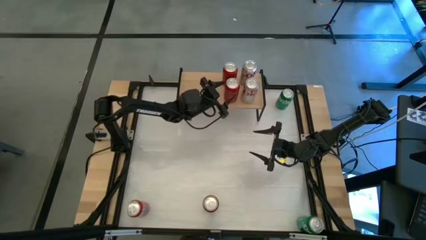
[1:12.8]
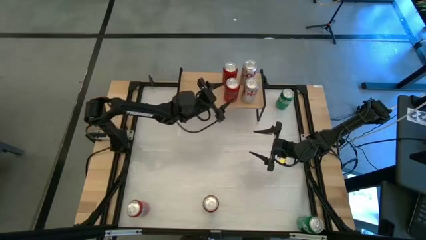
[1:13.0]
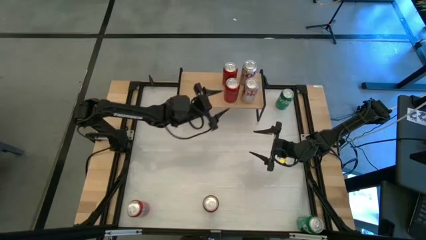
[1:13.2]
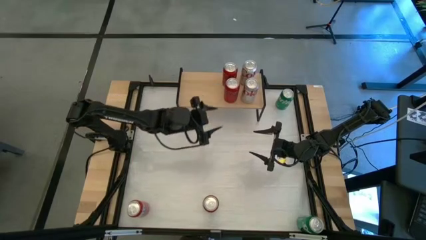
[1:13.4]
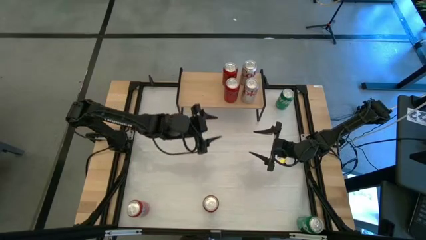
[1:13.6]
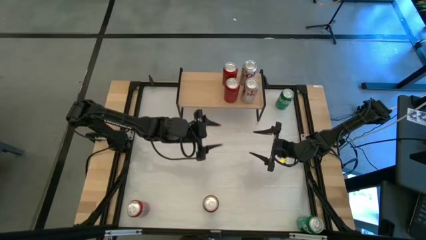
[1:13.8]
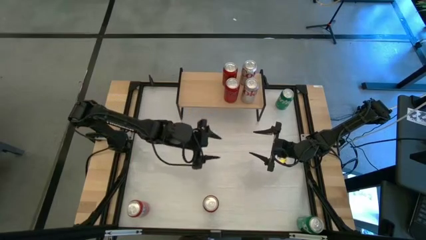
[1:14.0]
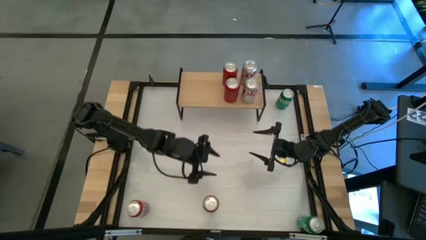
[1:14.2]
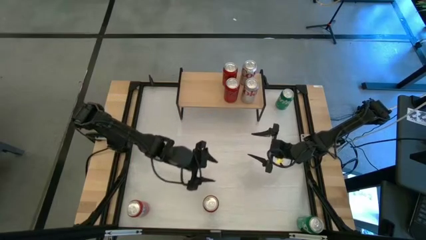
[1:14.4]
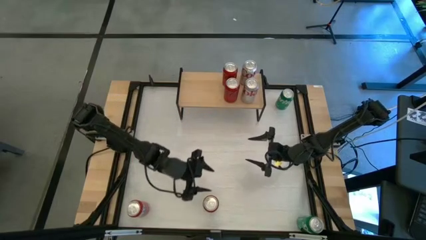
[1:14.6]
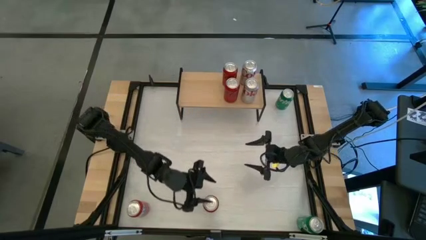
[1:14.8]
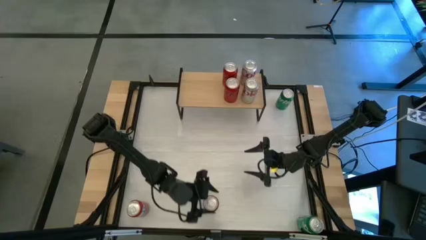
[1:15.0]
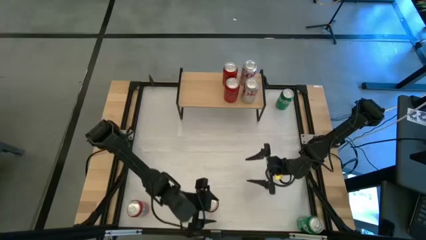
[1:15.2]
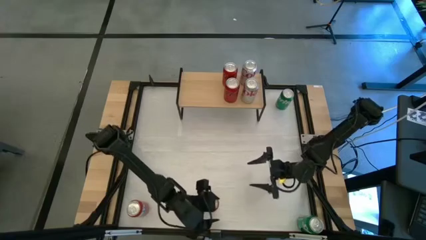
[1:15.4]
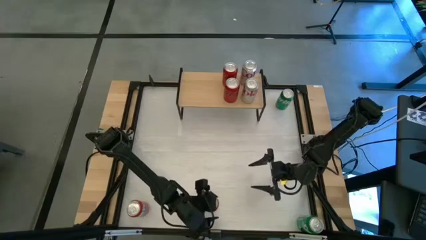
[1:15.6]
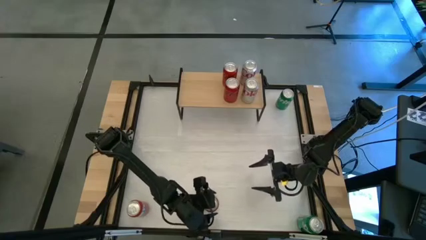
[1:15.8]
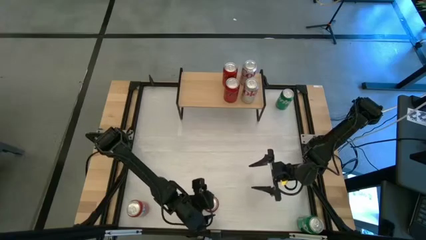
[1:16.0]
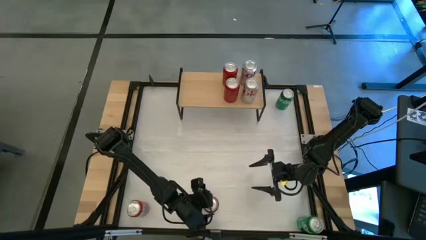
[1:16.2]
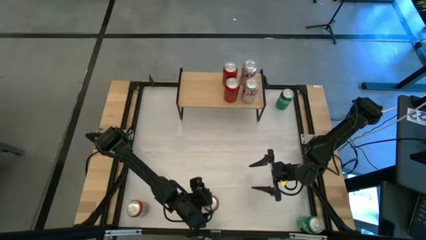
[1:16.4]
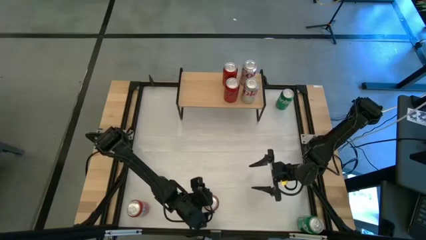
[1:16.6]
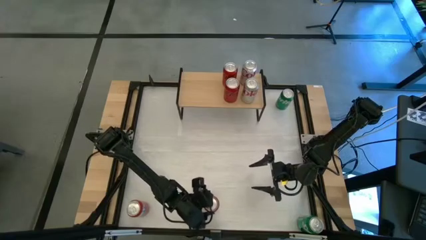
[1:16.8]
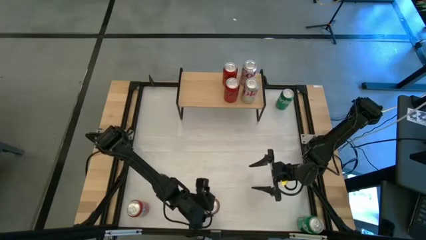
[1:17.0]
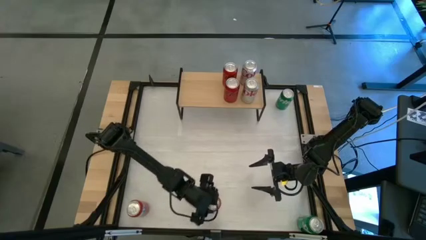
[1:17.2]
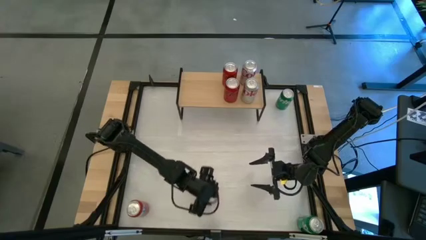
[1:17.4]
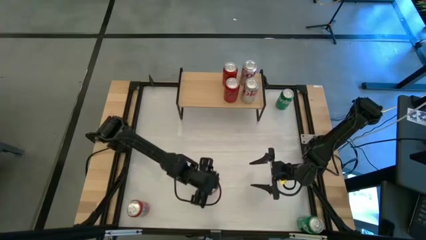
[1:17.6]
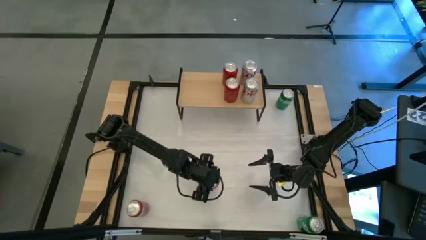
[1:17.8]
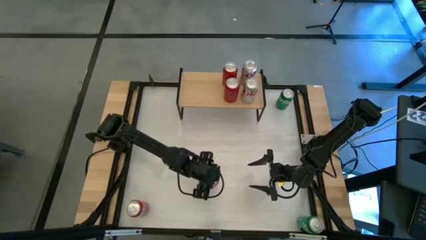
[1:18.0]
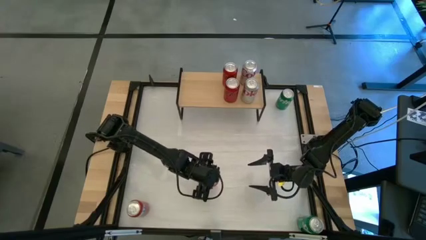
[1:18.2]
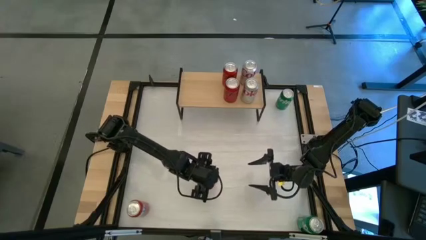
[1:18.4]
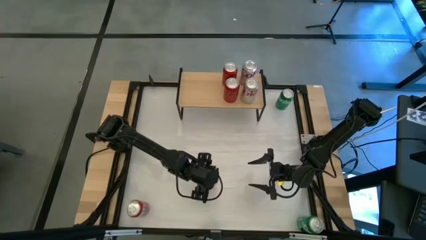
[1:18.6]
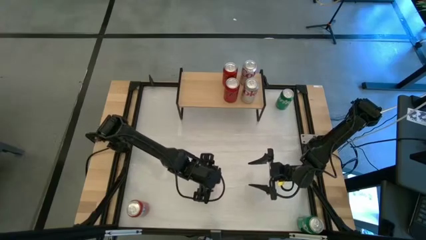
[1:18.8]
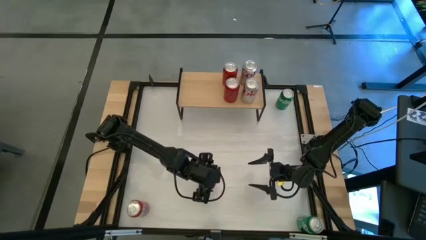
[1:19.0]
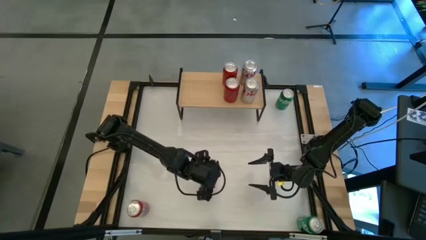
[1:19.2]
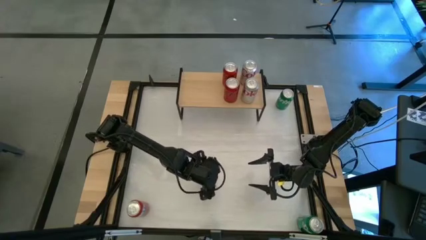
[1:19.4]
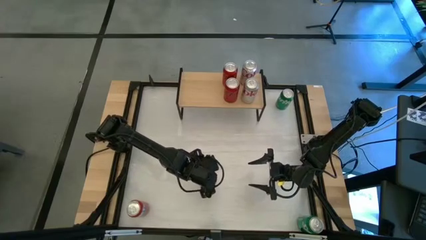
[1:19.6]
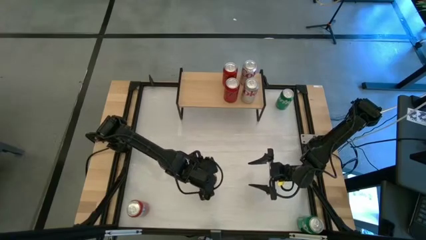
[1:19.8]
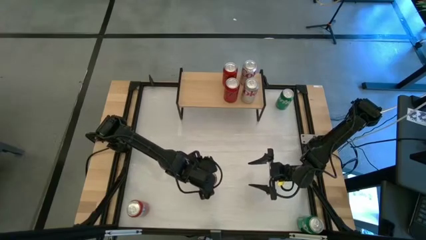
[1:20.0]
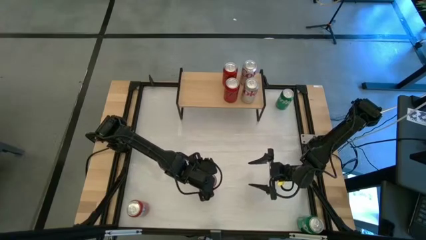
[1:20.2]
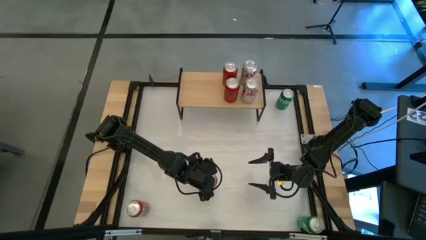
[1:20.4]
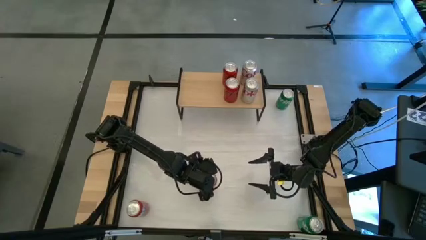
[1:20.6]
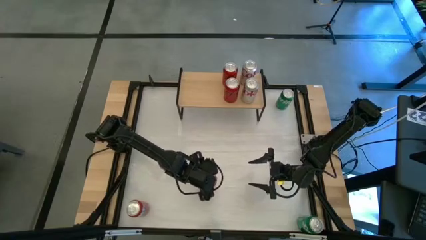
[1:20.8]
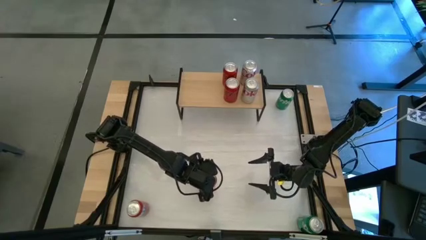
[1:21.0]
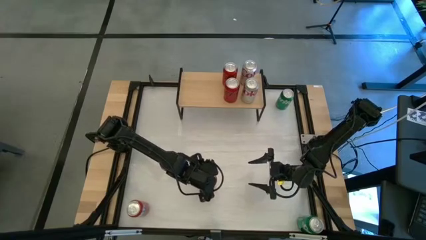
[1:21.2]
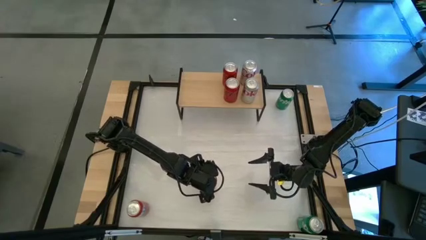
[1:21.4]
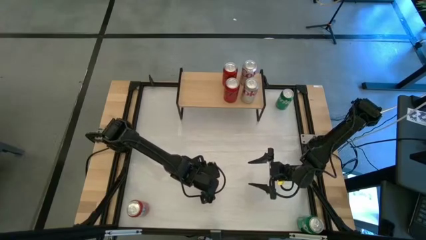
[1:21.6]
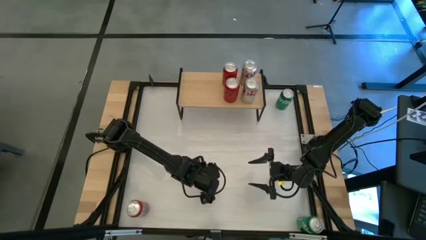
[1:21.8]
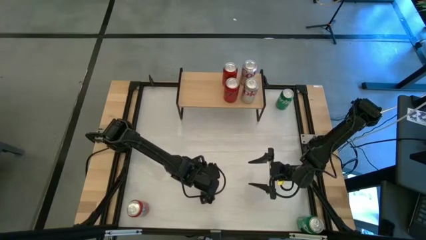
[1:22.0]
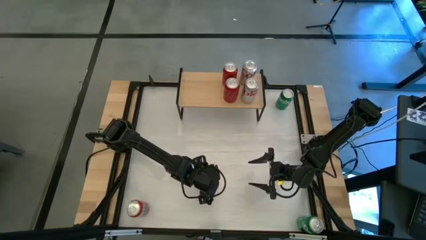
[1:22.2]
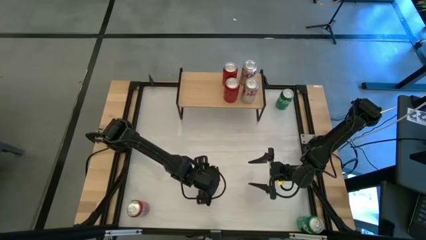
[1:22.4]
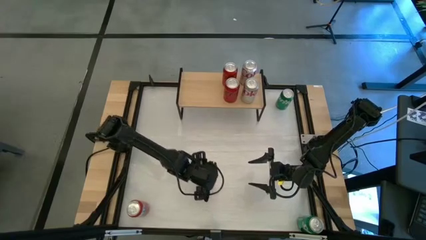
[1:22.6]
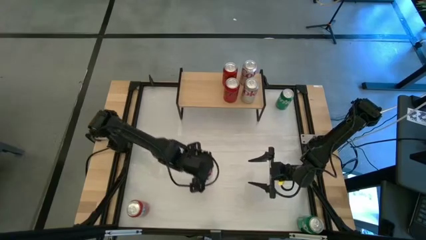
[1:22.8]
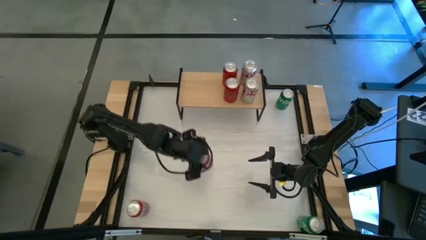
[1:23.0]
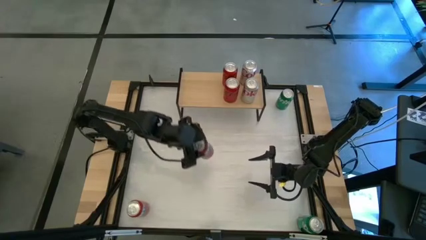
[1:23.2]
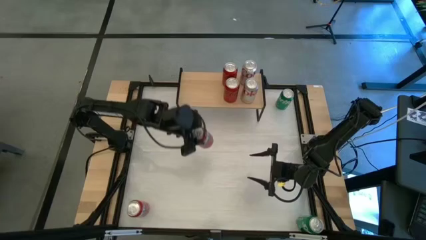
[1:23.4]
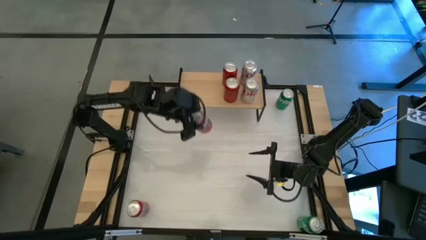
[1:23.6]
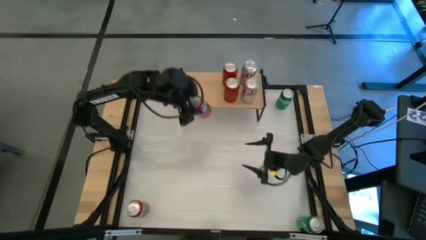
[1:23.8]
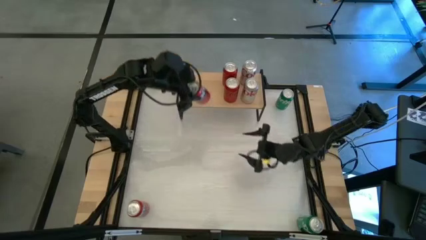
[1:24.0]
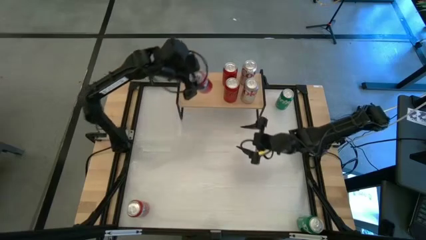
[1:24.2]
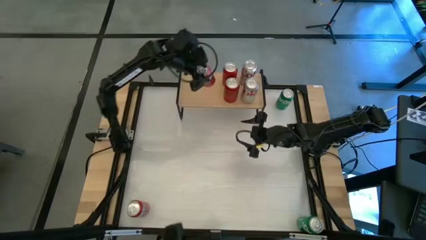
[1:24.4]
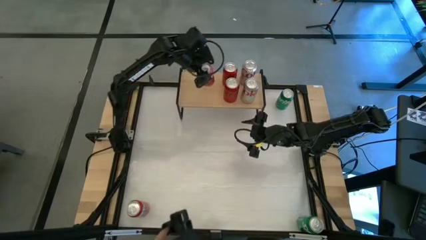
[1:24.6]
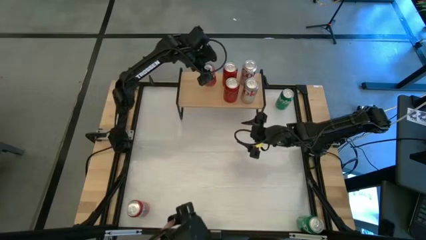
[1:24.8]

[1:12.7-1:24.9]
Task: Place canned beverage on shelf
Put the right red soda can on the shelf
